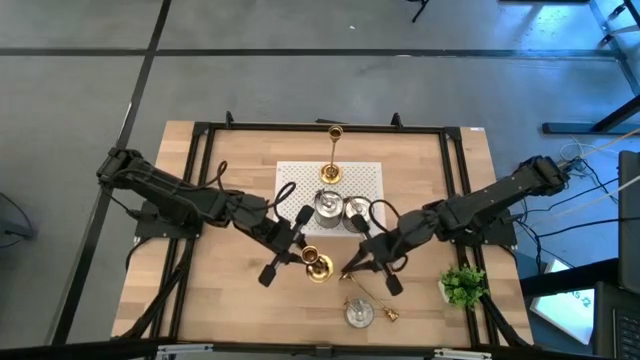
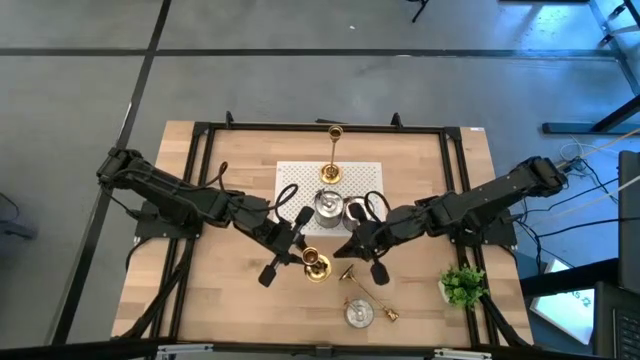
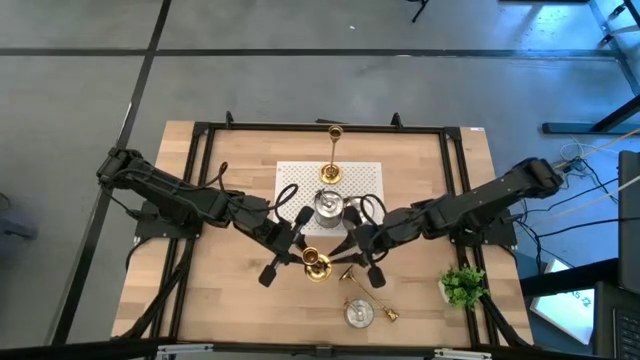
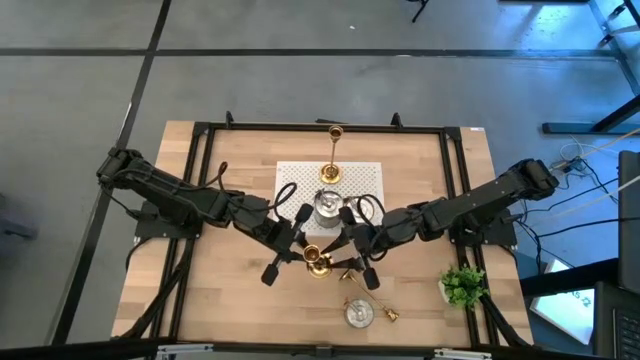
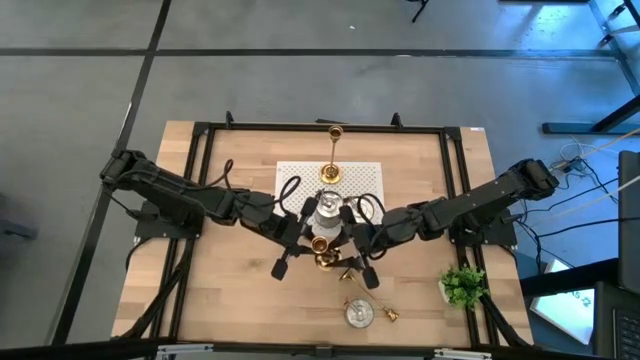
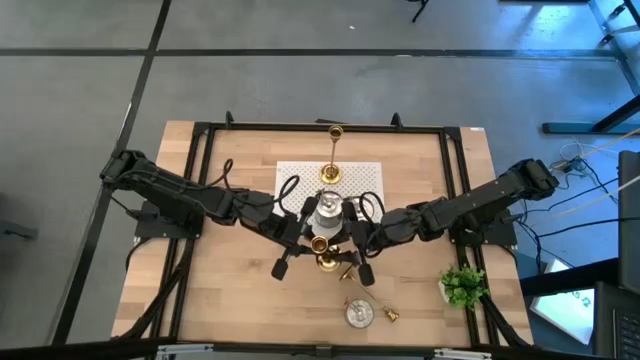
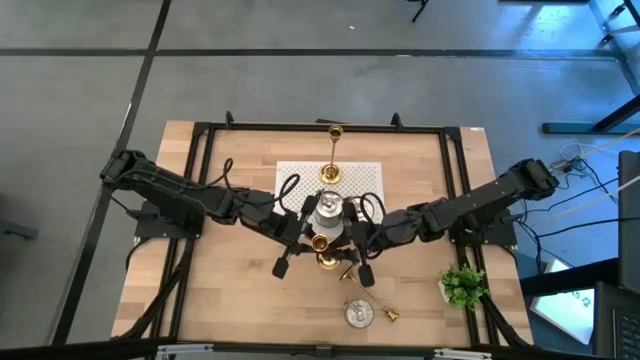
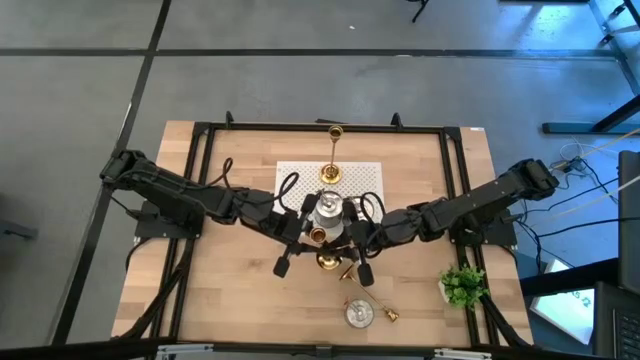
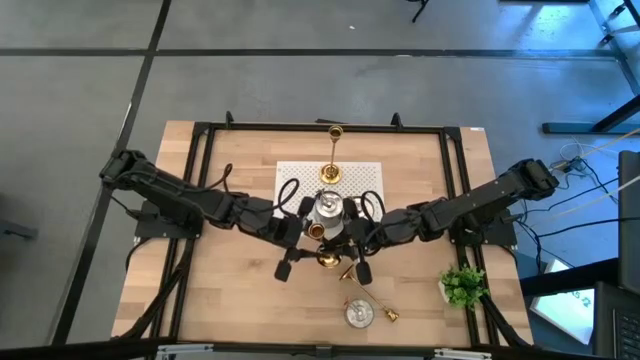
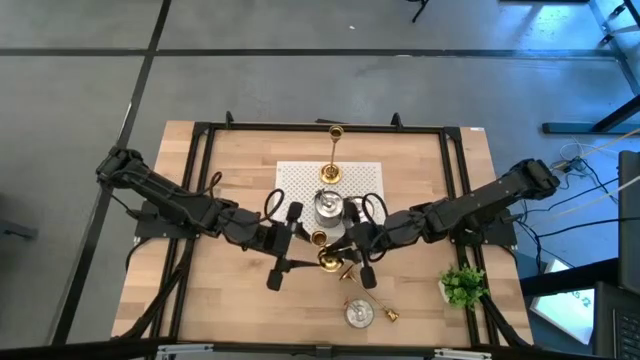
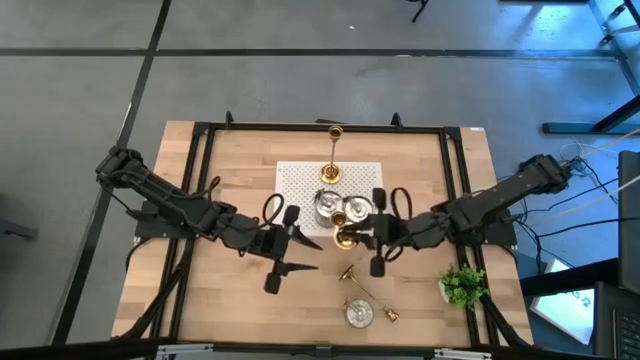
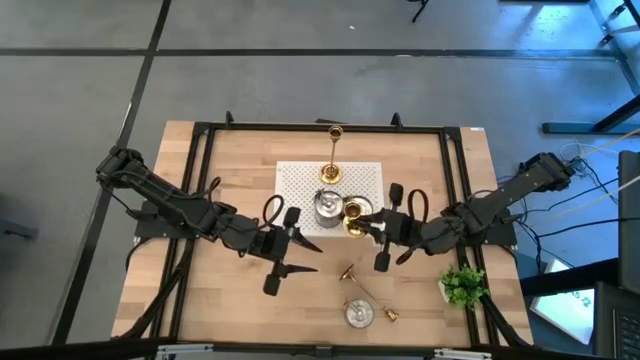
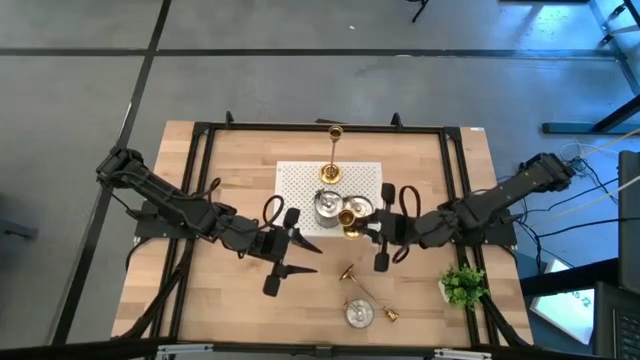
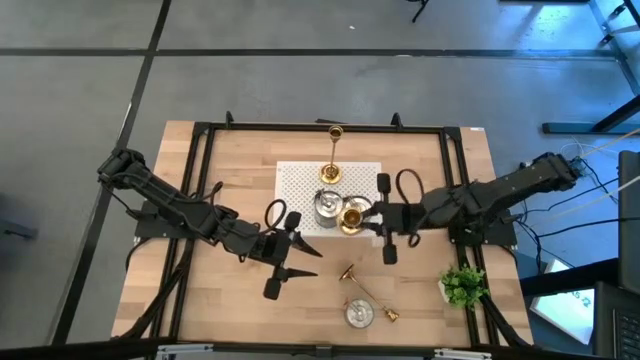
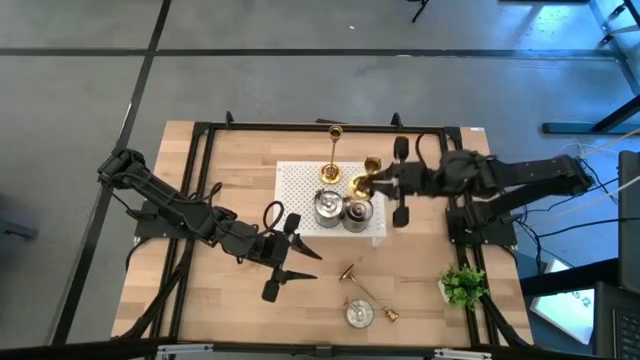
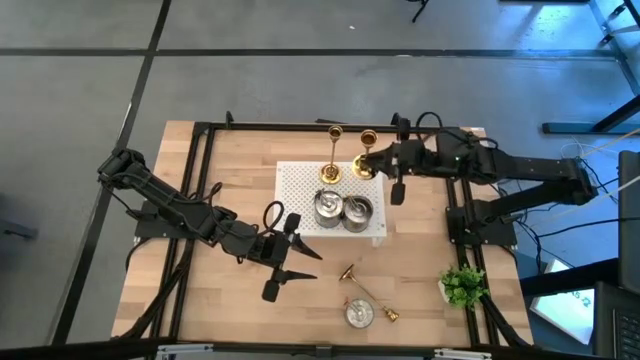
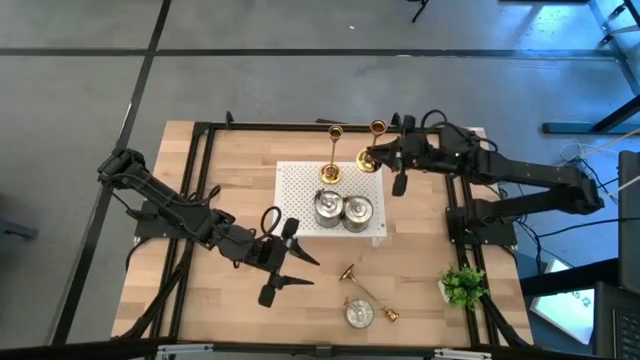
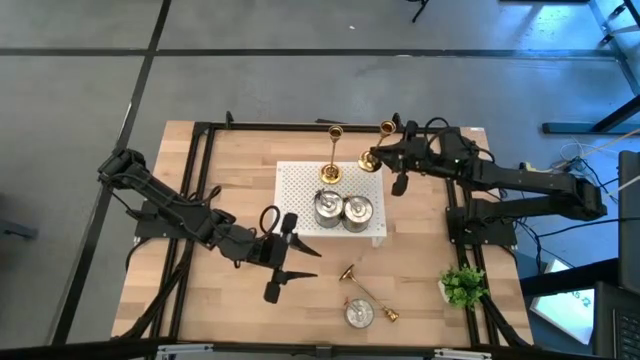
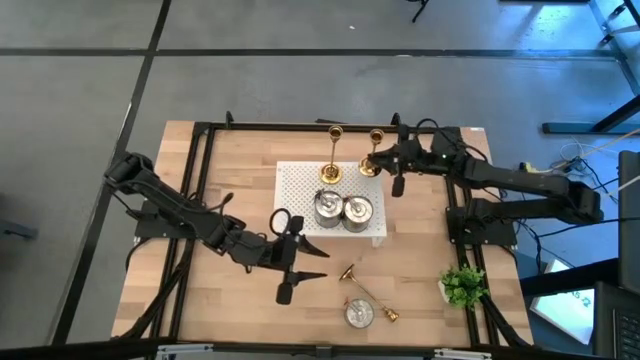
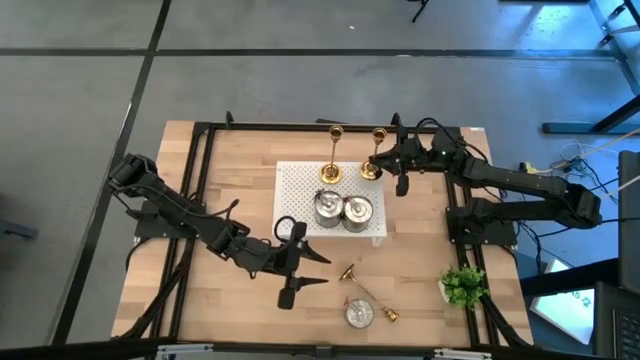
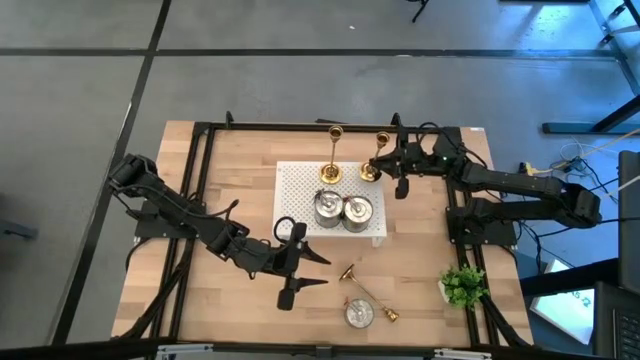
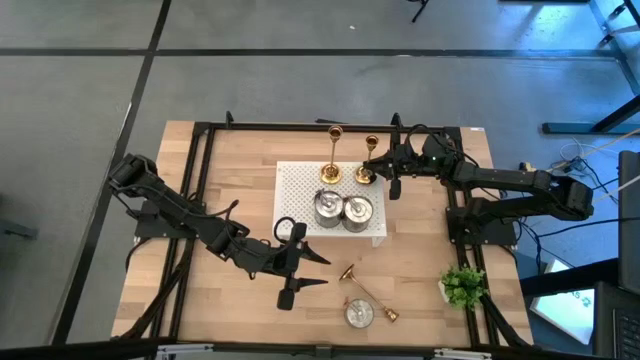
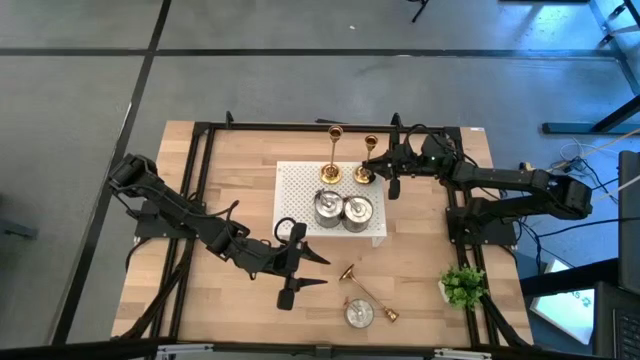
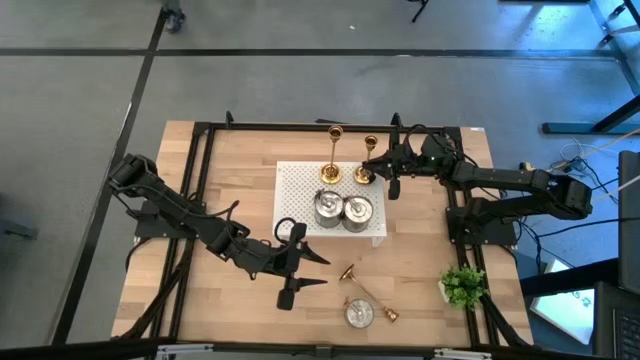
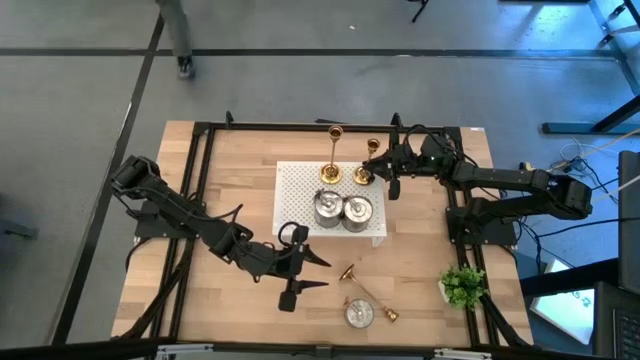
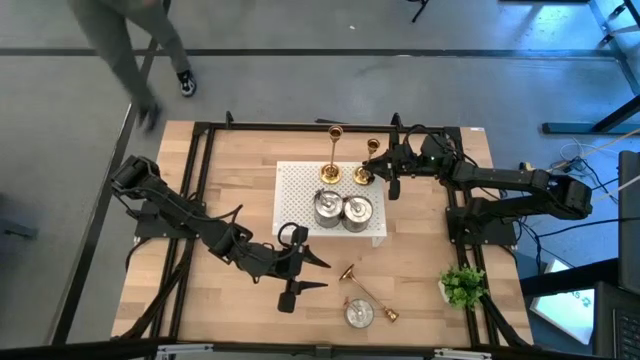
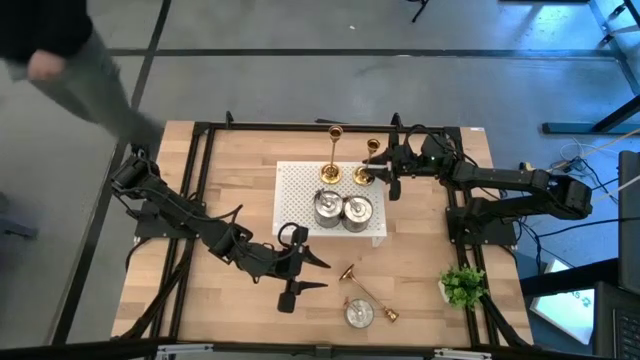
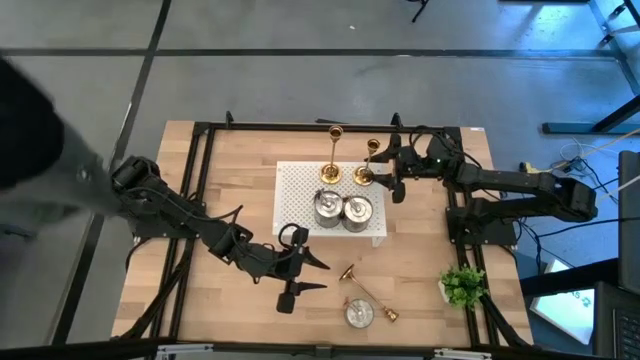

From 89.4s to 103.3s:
Task: Pick & Place candle stick holders
Put the left gold candle holder on the shelf aligned with the other gold candle holder

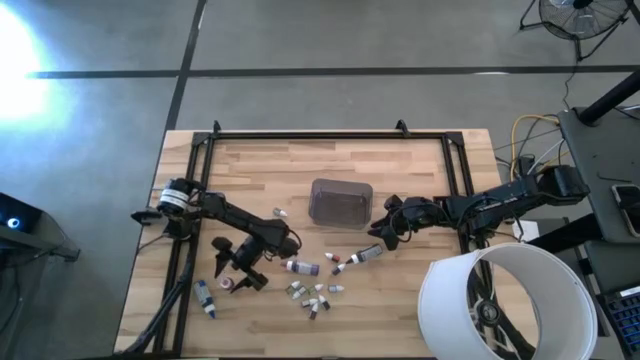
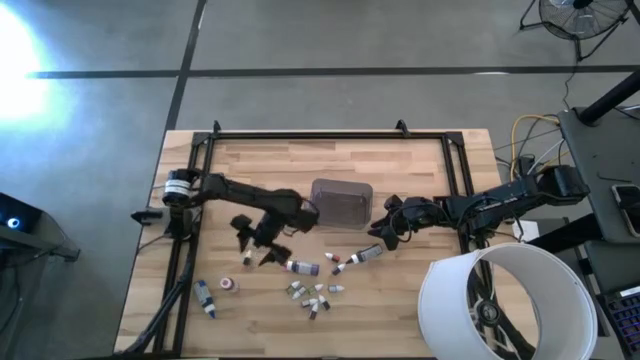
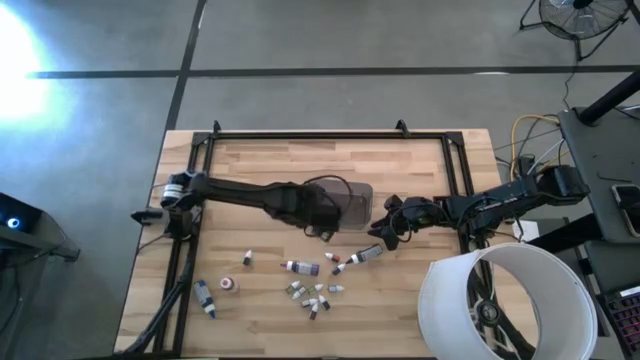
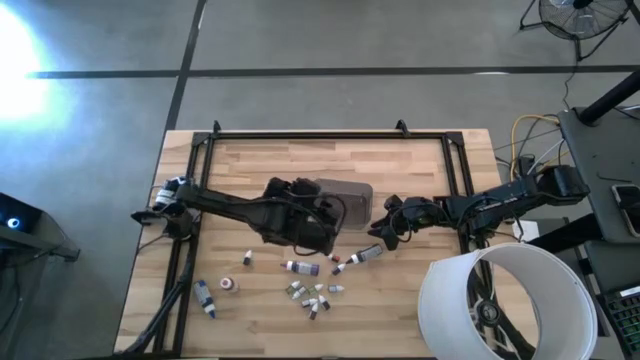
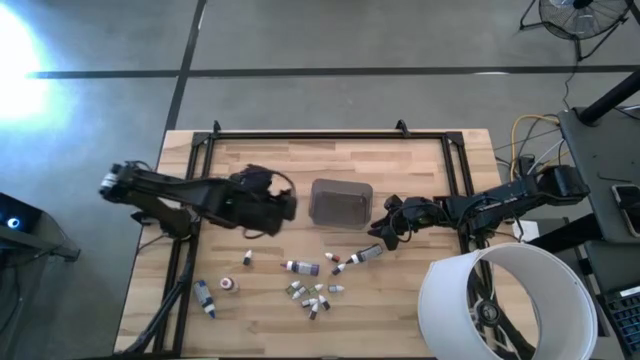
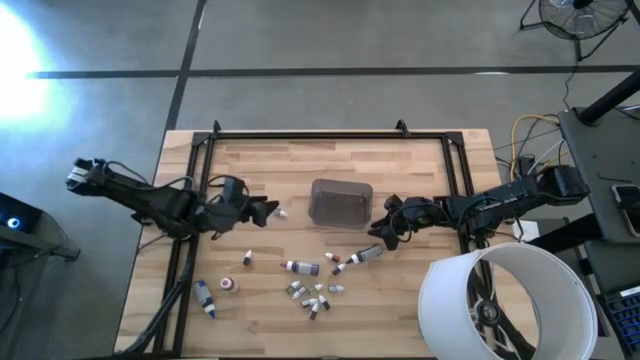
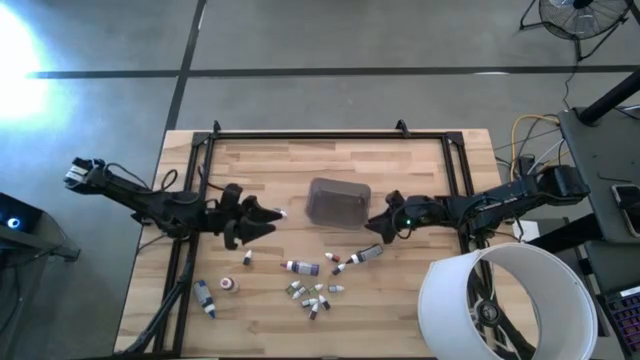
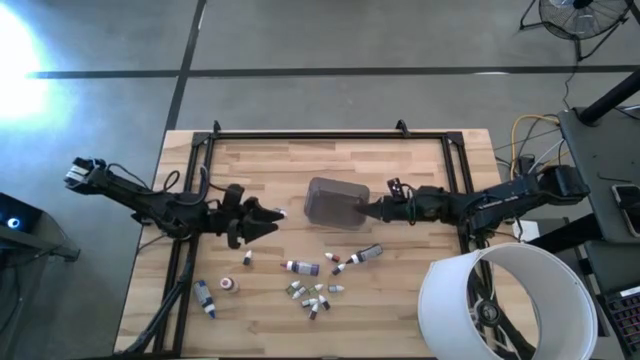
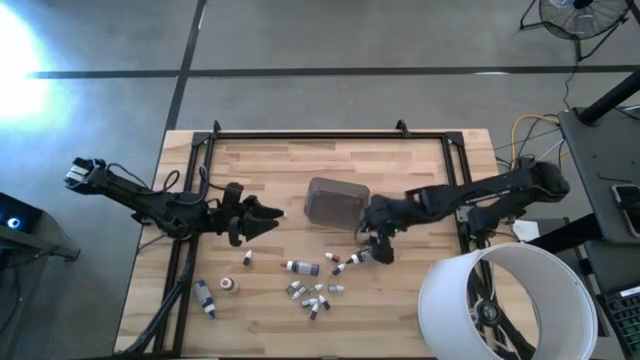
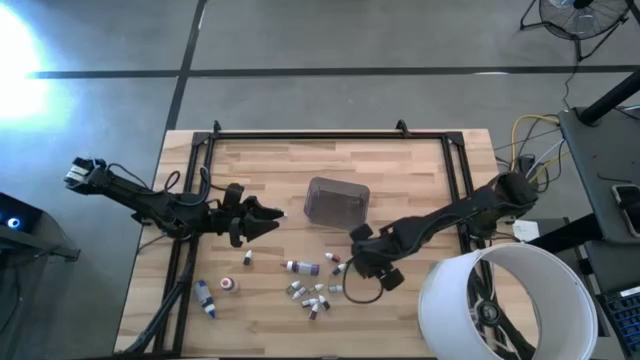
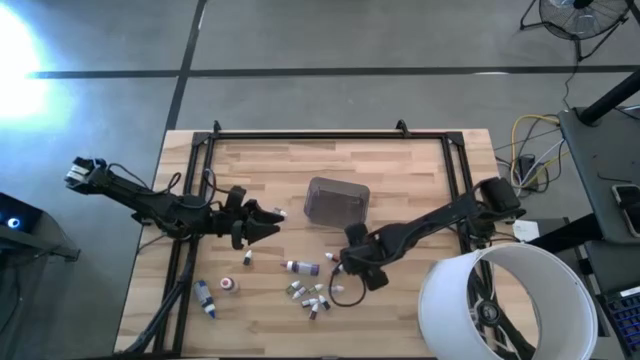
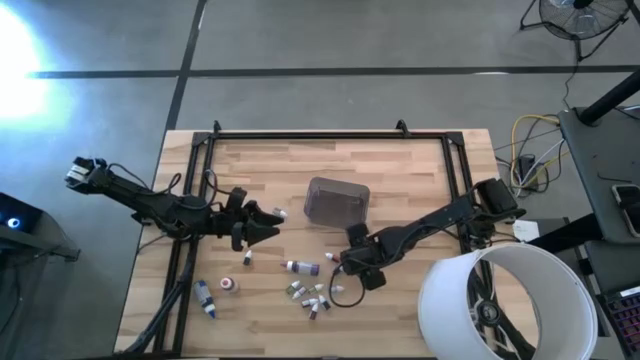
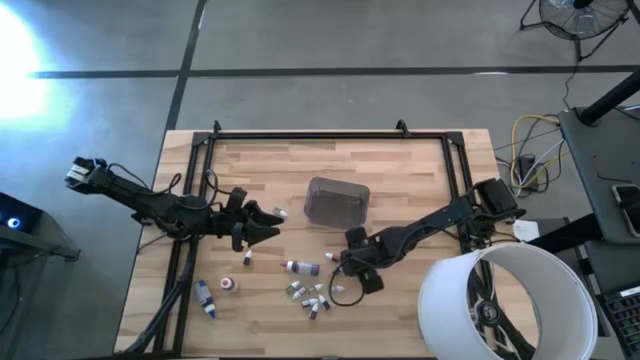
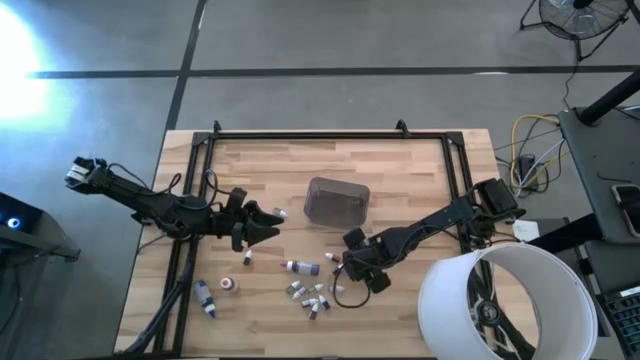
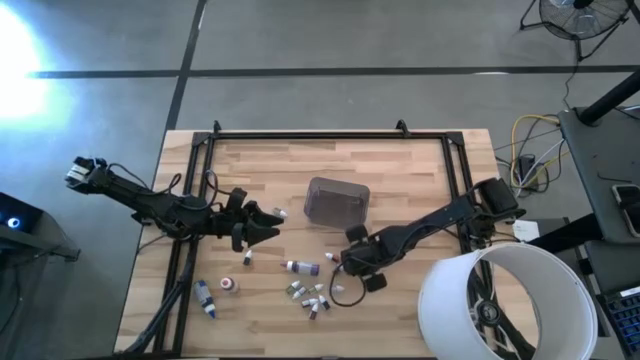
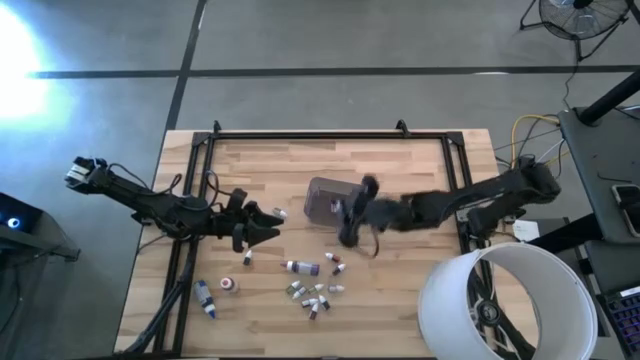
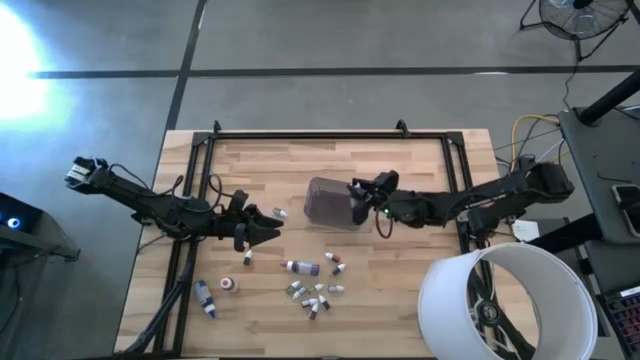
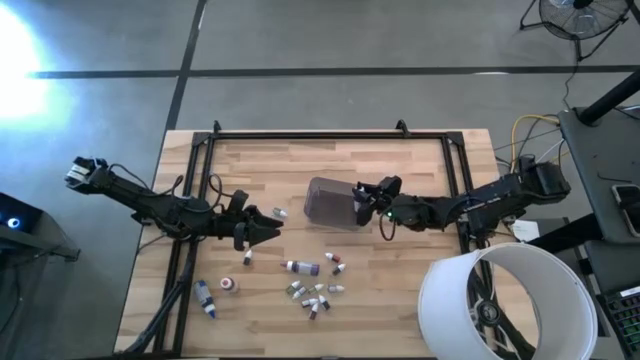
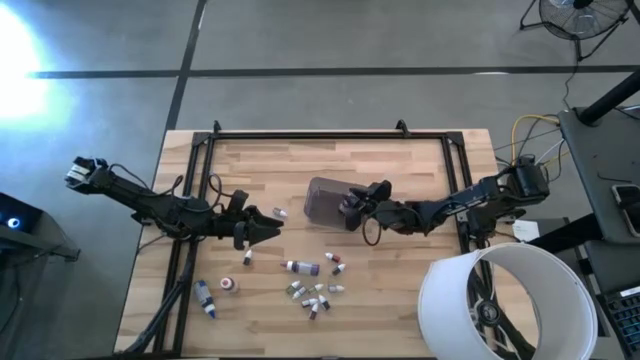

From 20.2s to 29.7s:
Task: Pick & Place food coloring
Put the large black food coloring bottle into the black bin
